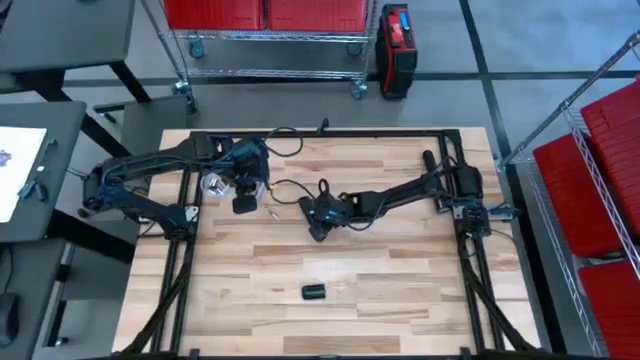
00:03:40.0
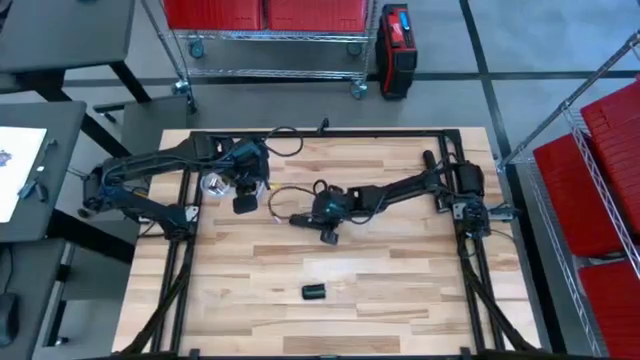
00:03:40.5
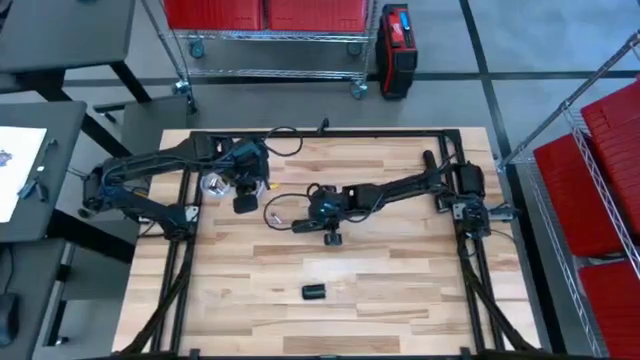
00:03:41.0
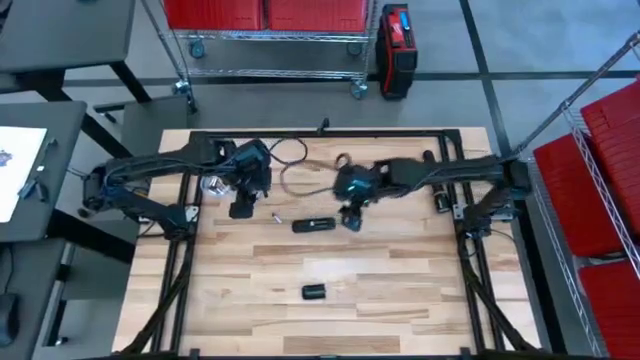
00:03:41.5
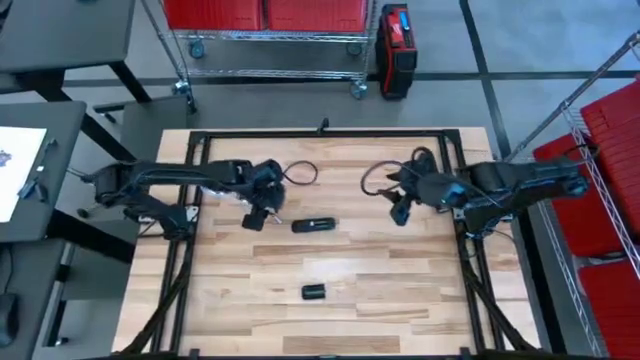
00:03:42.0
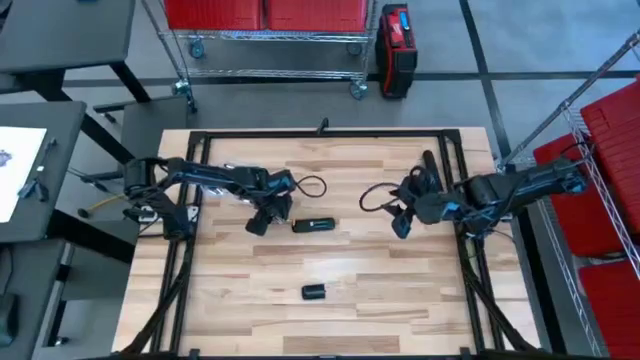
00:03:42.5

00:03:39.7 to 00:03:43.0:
Task: Insert battery
Insert the silver battery into the remote's battery compartment

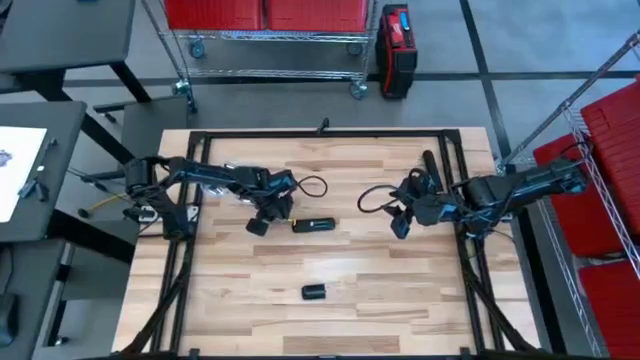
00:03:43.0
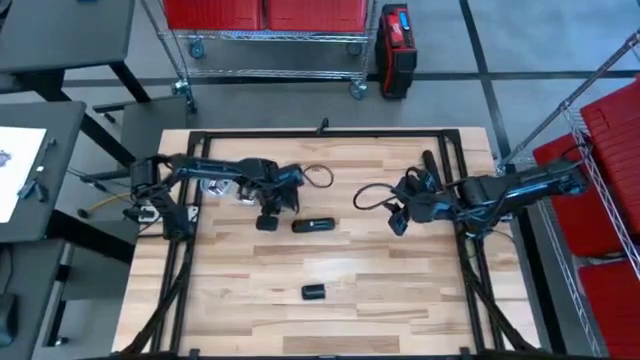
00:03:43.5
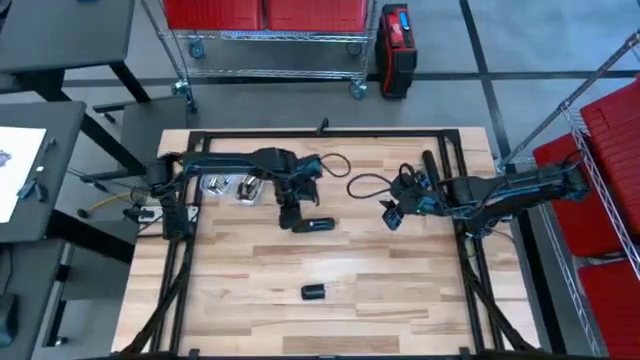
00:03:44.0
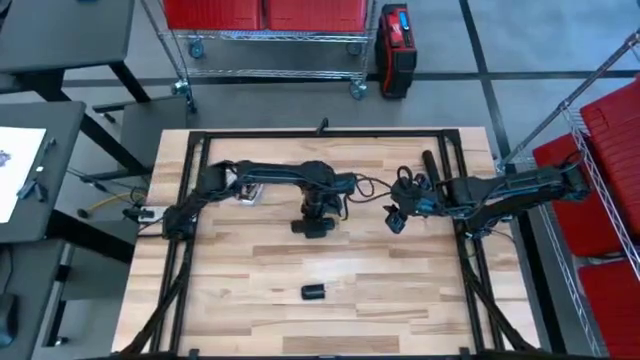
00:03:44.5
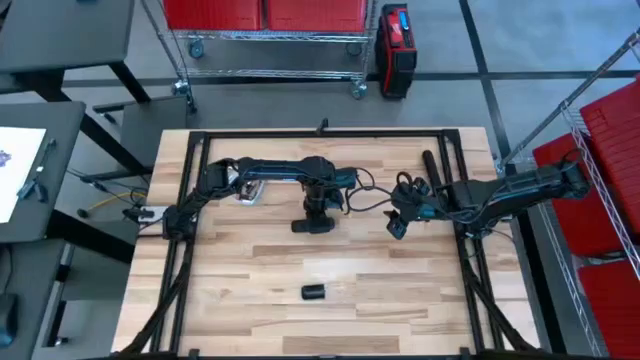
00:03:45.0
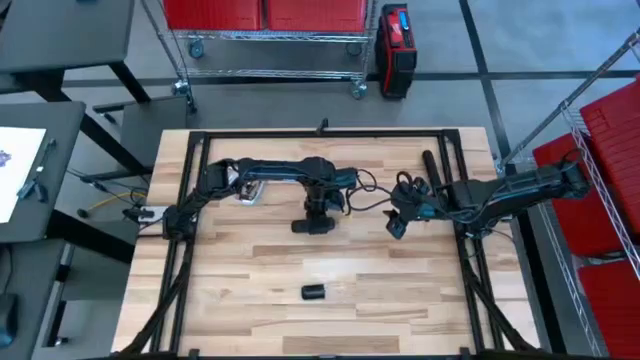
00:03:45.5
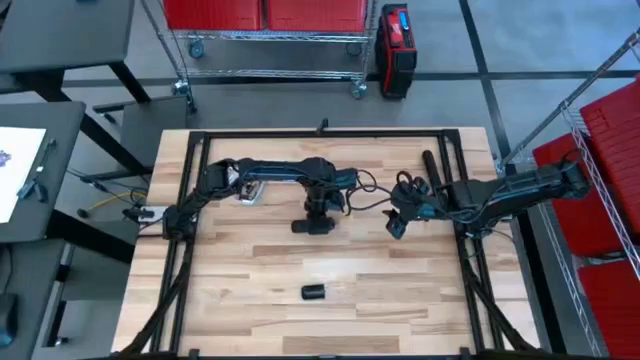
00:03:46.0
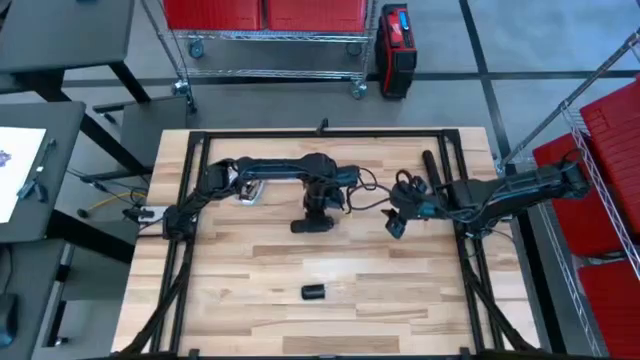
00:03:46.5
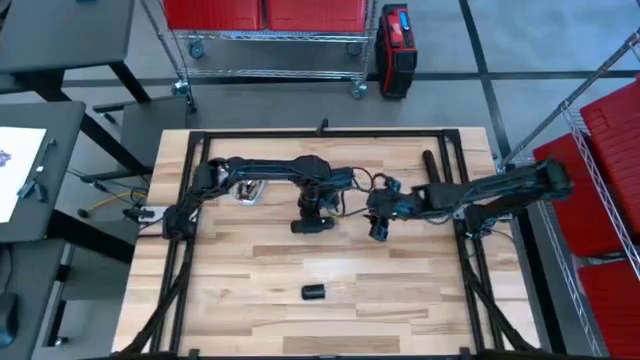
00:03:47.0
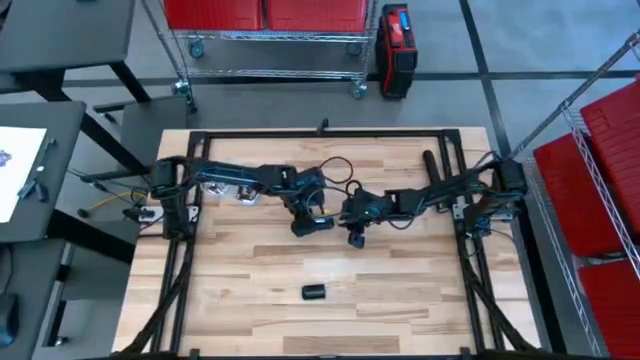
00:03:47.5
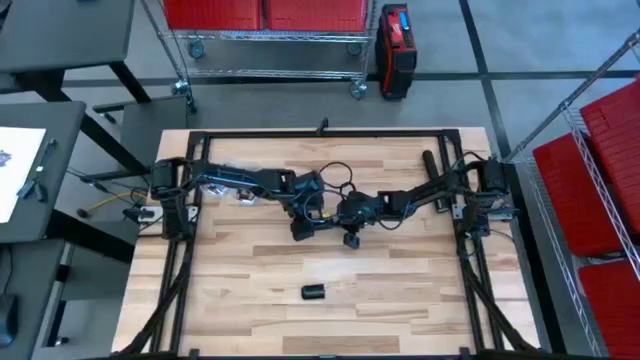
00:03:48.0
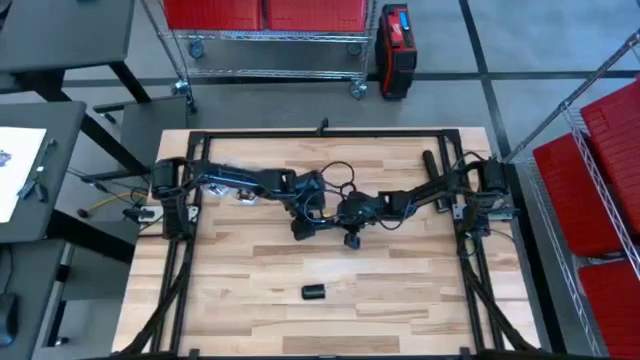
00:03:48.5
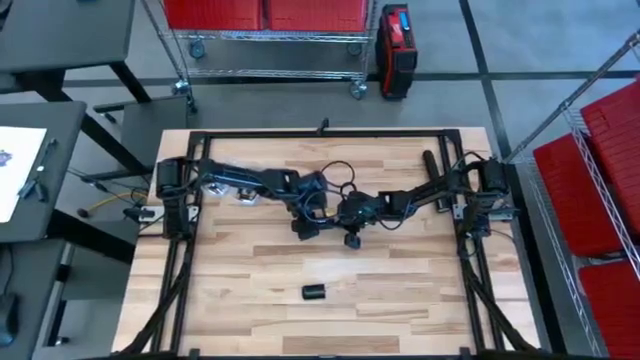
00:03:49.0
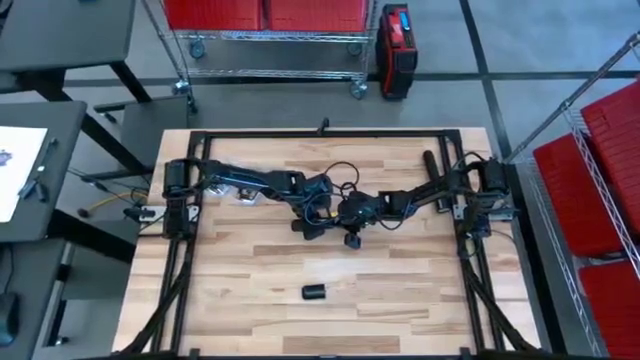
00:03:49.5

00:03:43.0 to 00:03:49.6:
Insert the silver battery into the remote's battery compartment

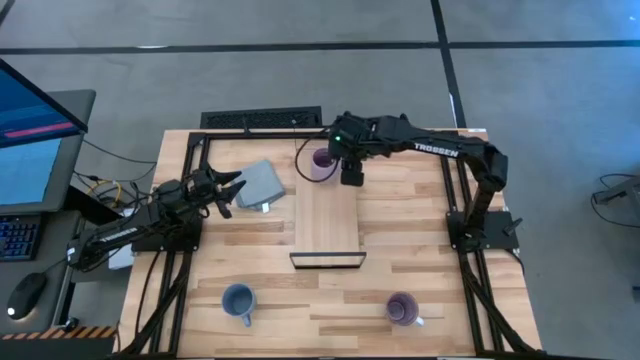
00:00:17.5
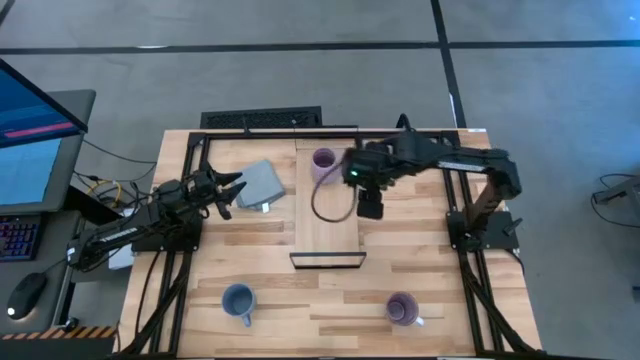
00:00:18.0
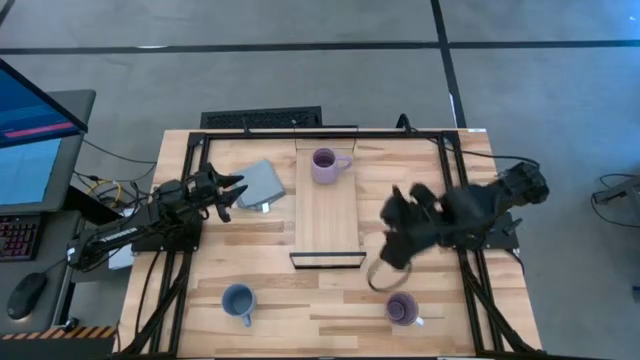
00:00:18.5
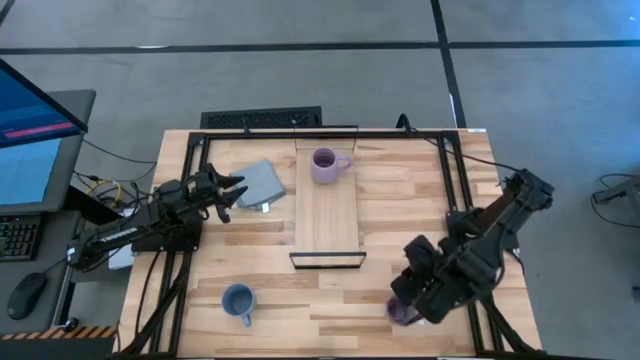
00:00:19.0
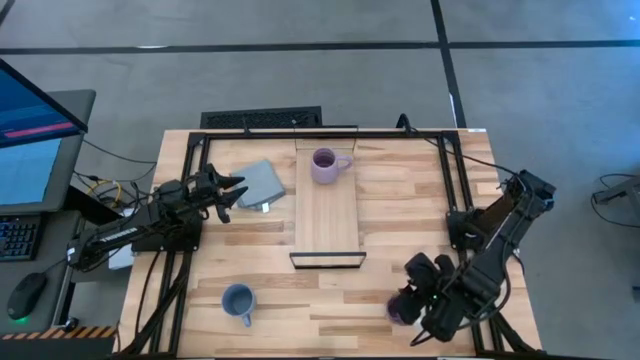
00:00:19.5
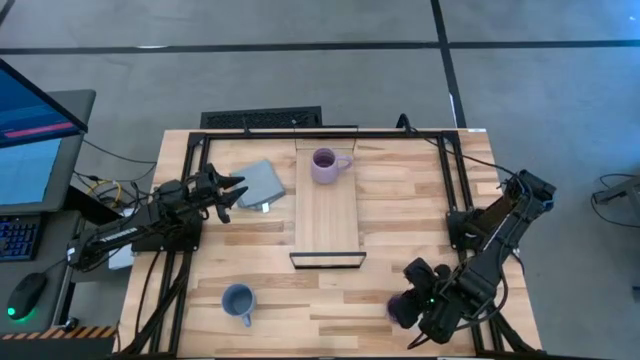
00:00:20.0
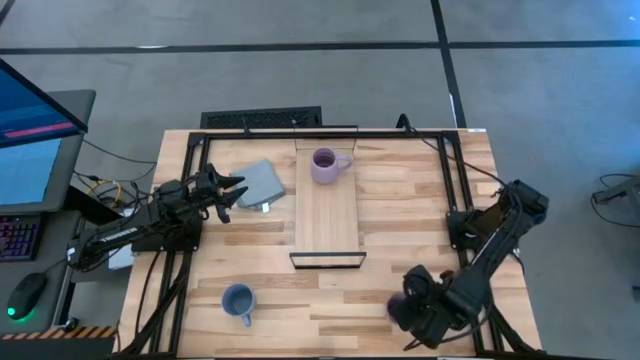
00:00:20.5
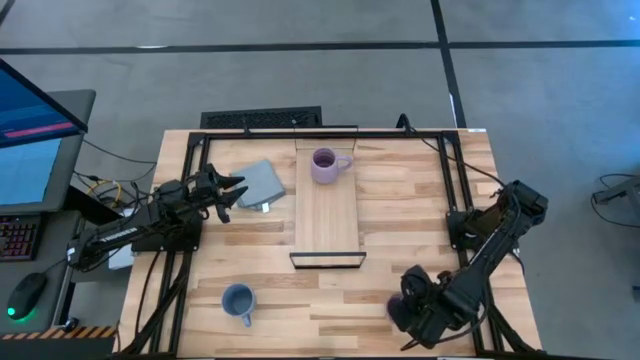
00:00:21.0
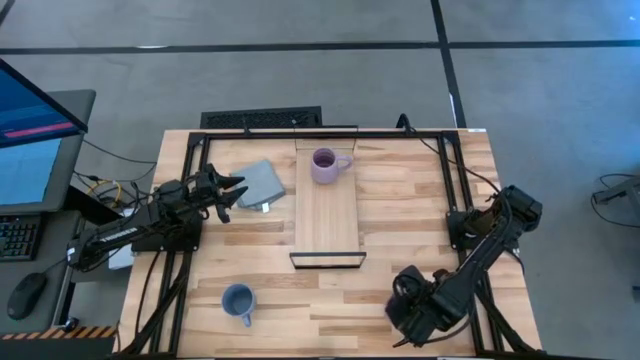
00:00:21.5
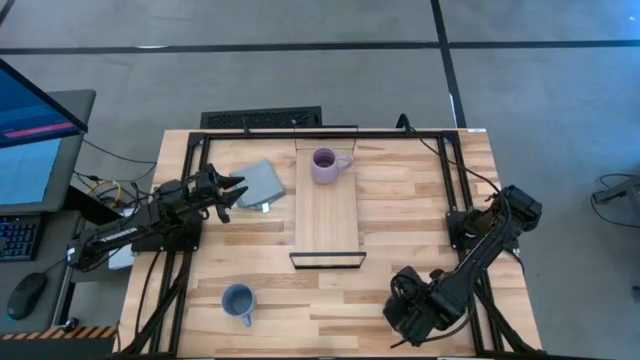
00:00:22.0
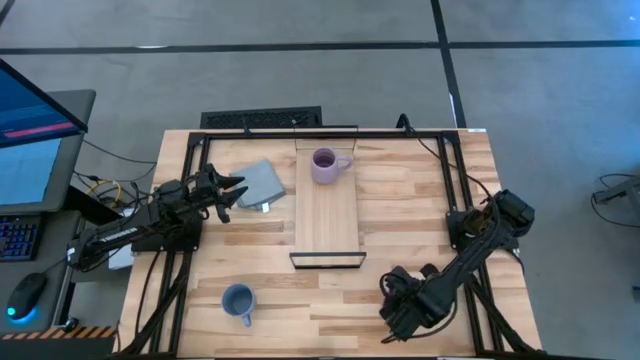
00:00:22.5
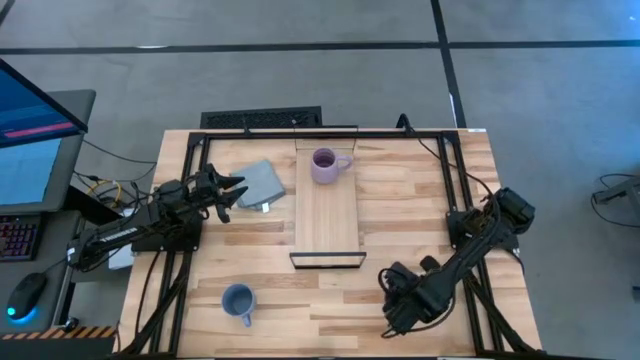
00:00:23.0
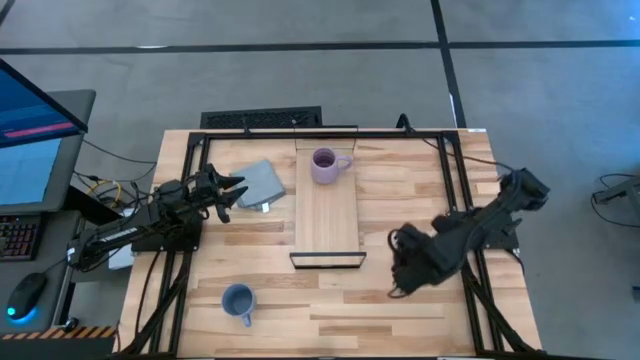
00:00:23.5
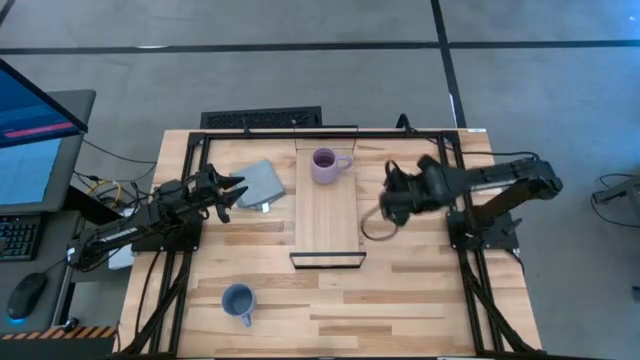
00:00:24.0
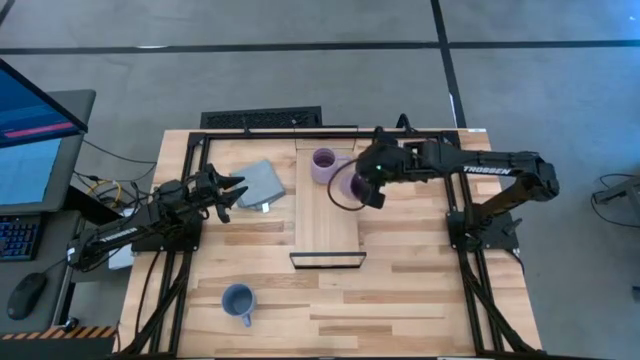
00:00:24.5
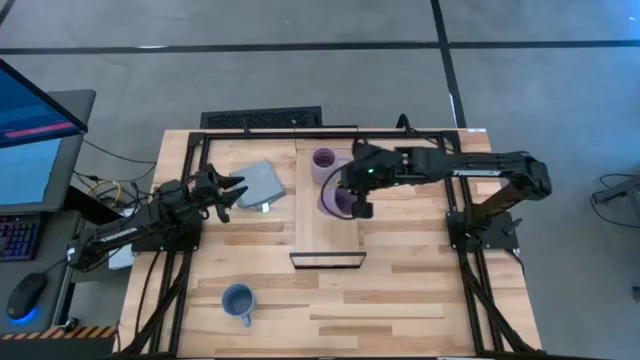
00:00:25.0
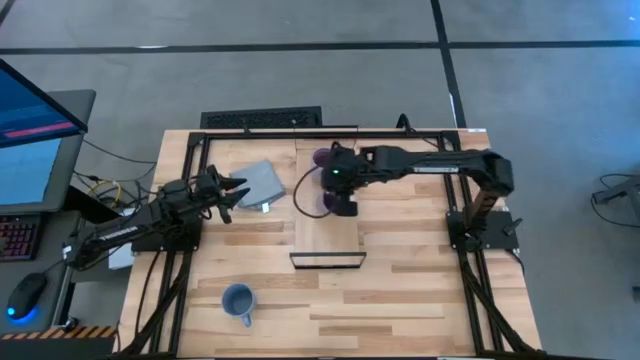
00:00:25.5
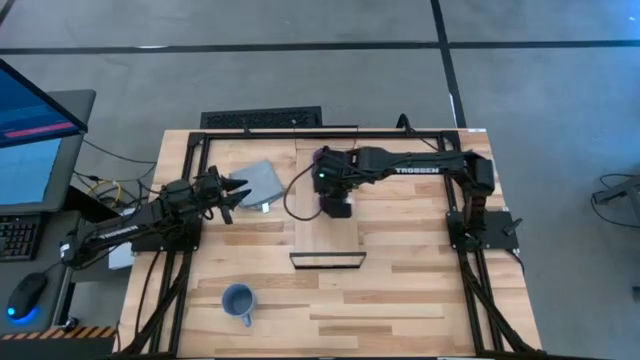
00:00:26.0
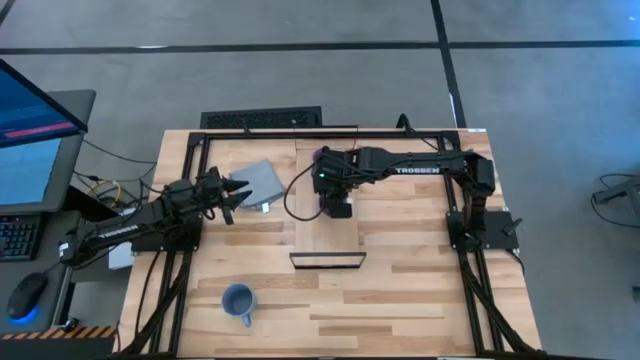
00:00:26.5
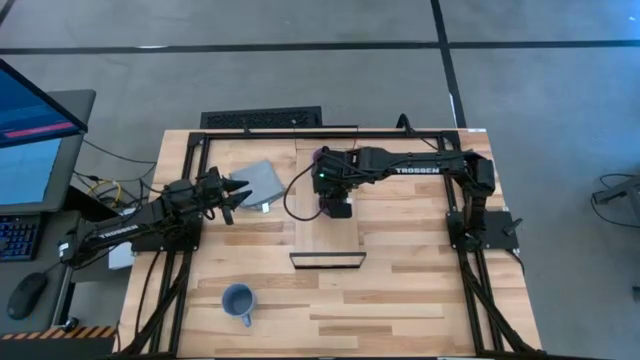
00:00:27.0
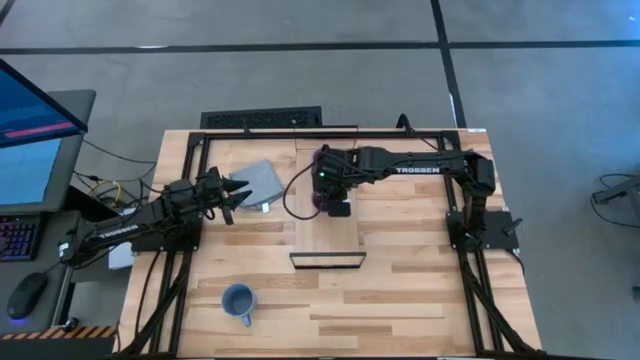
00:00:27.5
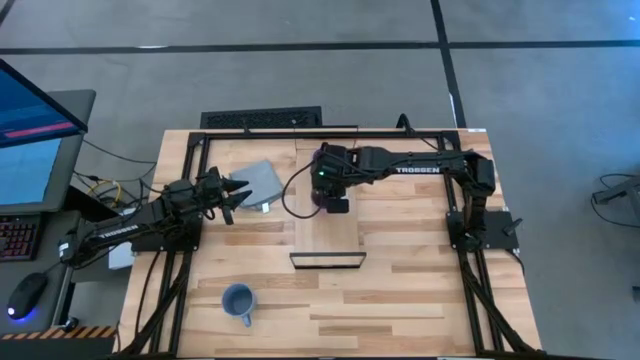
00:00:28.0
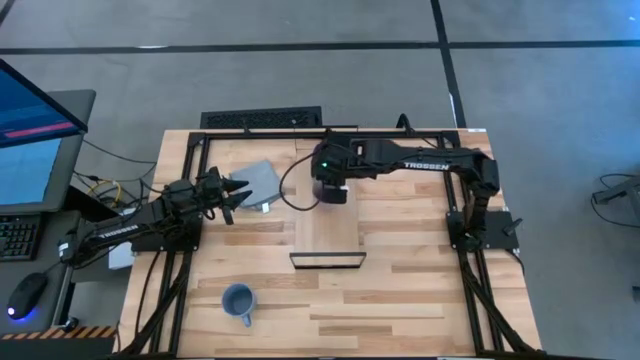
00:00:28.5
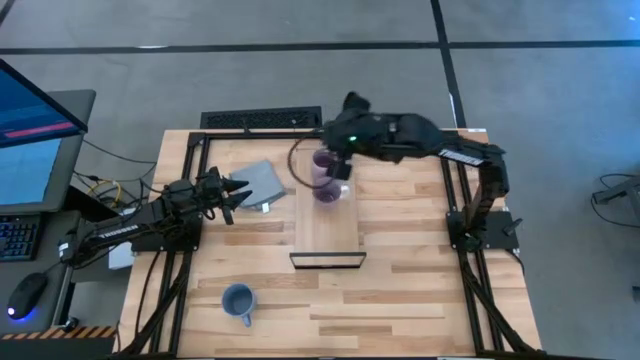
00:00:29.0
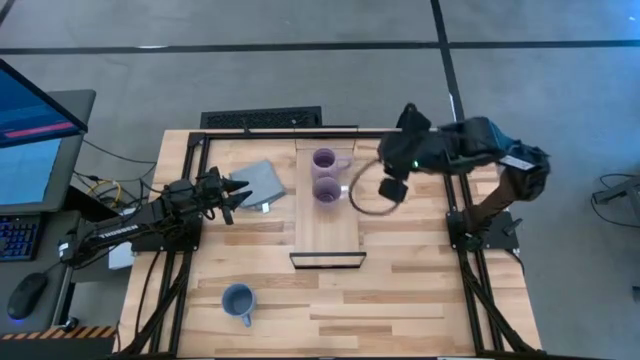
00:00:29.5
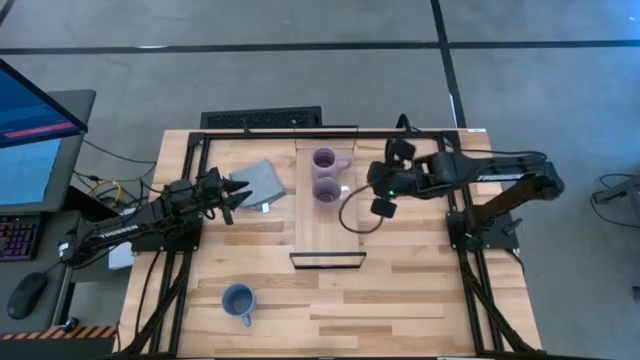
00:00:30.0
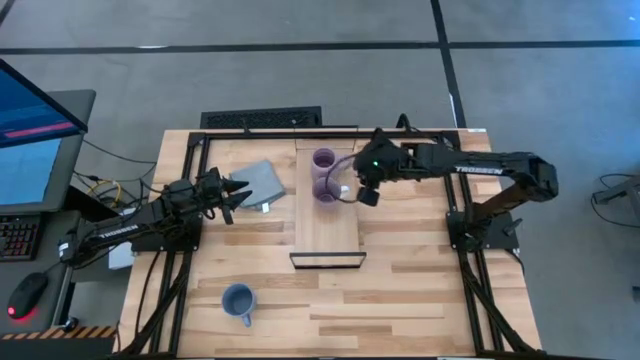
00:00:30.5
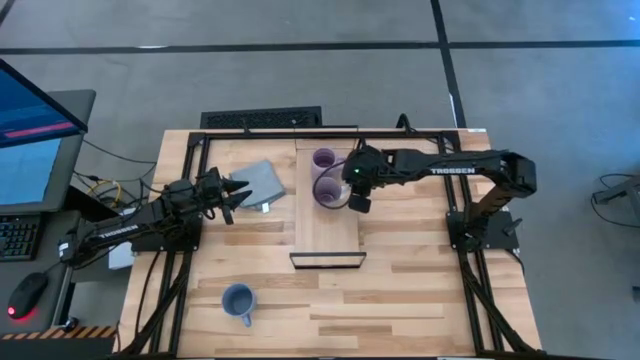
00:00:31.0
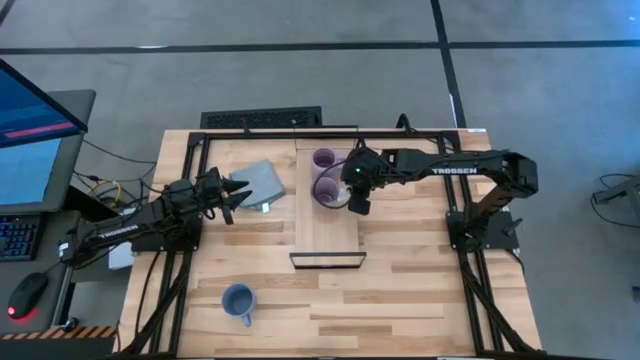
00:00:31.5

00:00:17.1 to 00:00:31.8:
Task: Stack small to large cups/mugs on shelf
Put the purple mug on the shelf
